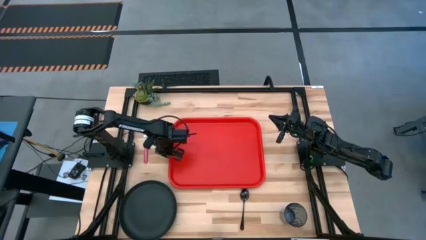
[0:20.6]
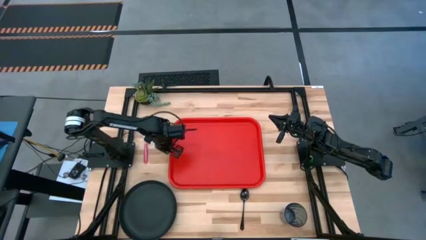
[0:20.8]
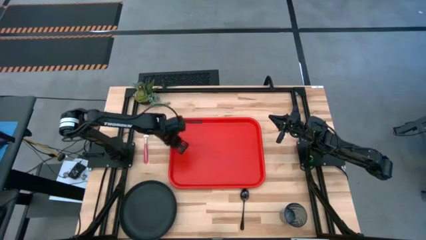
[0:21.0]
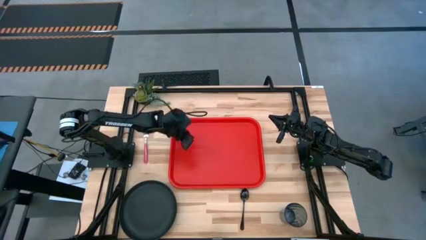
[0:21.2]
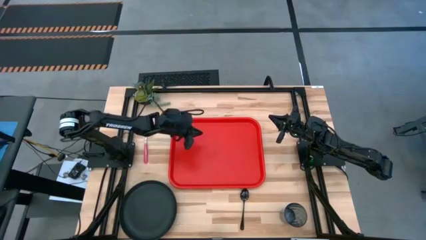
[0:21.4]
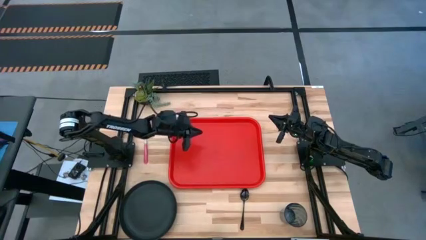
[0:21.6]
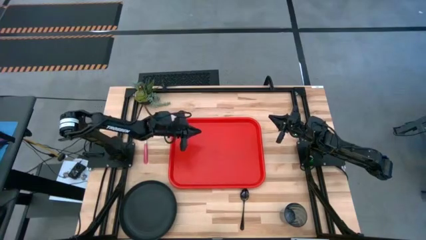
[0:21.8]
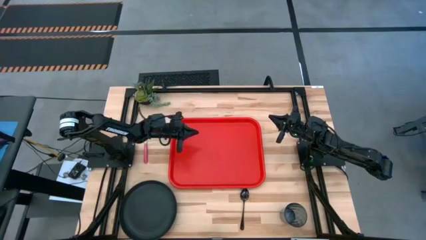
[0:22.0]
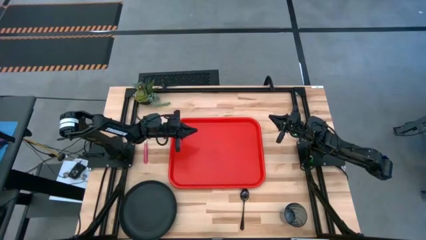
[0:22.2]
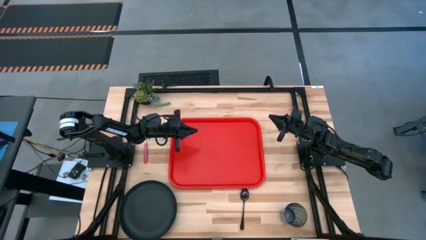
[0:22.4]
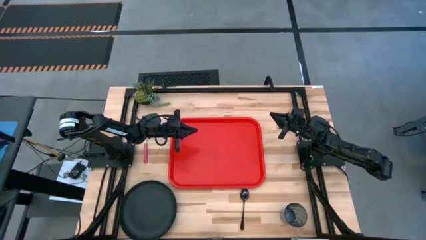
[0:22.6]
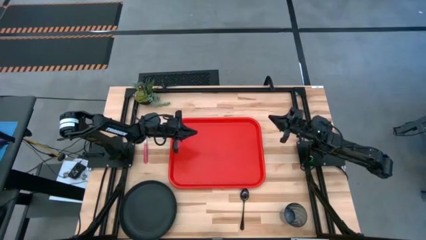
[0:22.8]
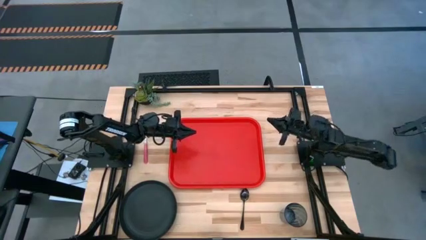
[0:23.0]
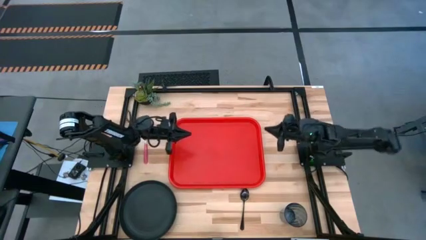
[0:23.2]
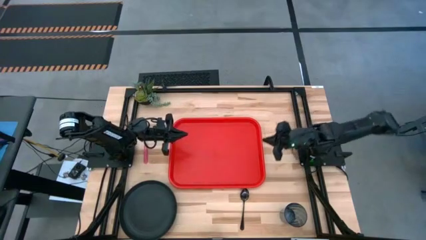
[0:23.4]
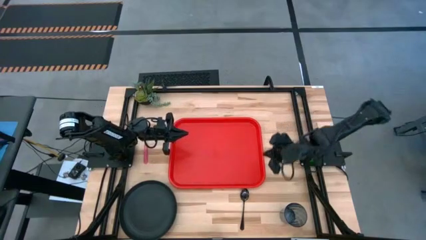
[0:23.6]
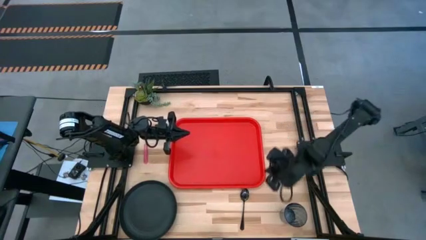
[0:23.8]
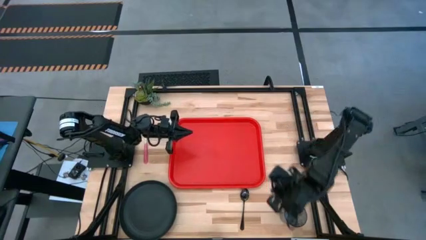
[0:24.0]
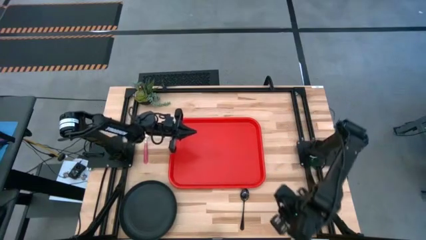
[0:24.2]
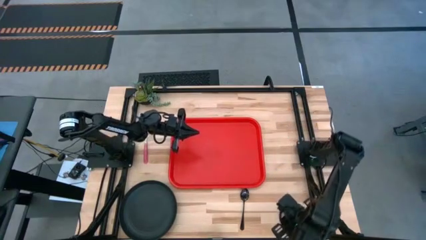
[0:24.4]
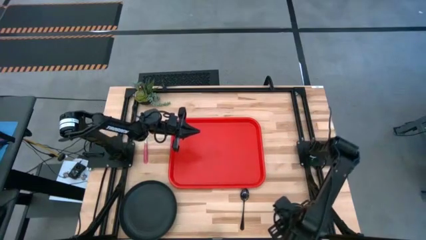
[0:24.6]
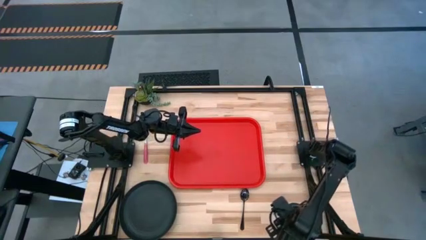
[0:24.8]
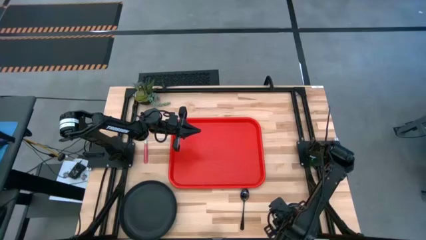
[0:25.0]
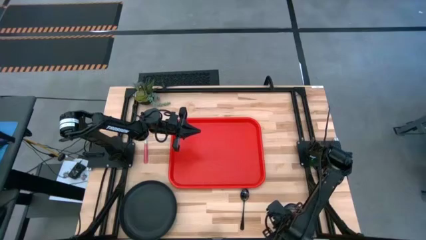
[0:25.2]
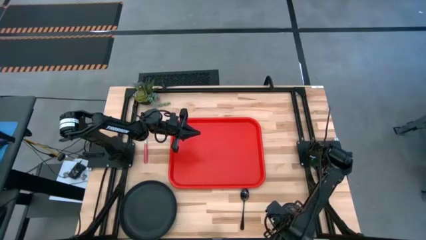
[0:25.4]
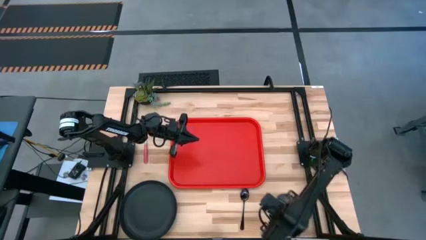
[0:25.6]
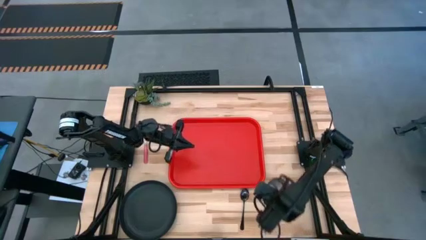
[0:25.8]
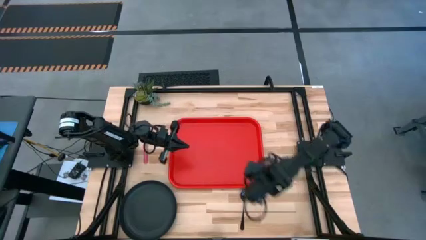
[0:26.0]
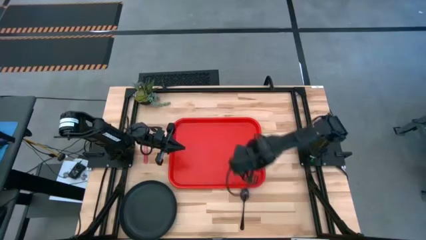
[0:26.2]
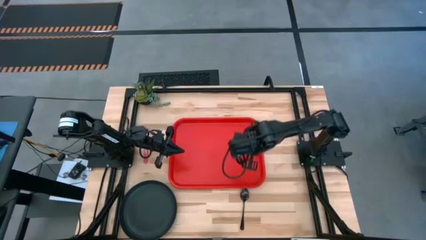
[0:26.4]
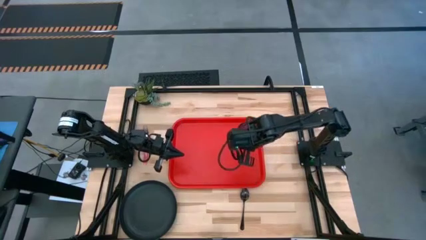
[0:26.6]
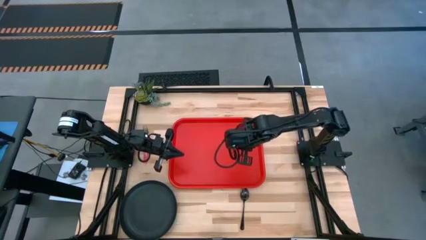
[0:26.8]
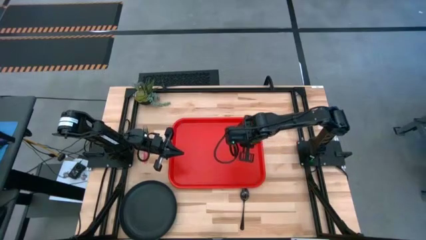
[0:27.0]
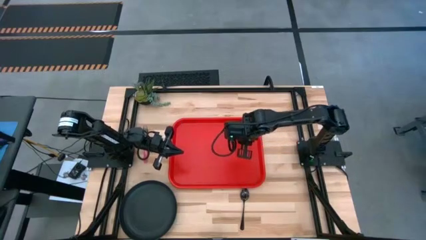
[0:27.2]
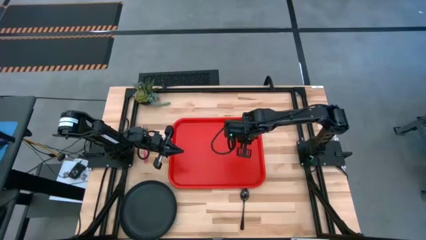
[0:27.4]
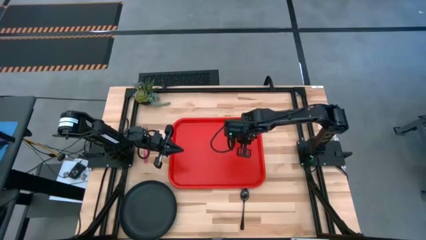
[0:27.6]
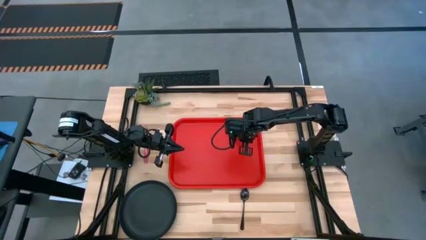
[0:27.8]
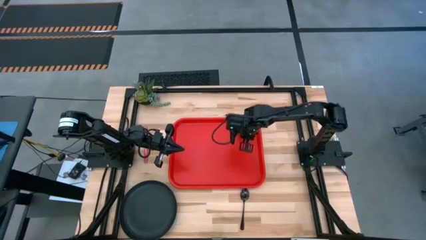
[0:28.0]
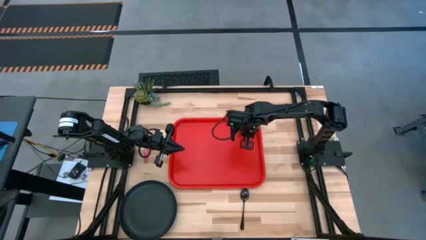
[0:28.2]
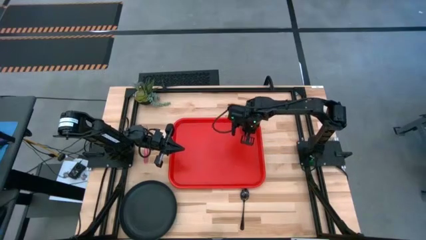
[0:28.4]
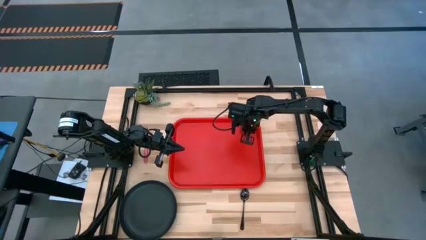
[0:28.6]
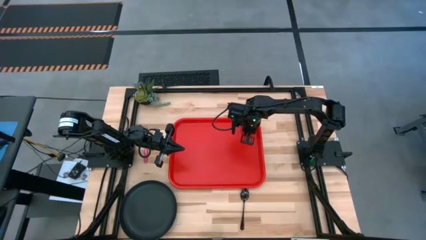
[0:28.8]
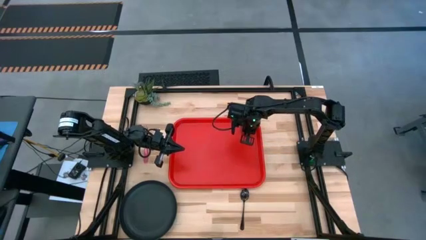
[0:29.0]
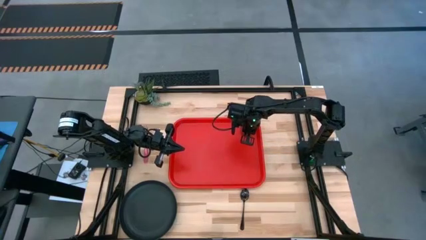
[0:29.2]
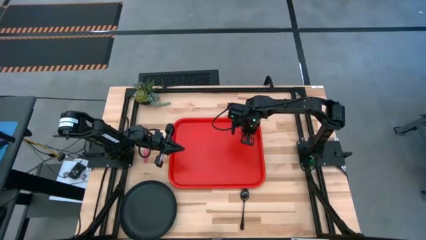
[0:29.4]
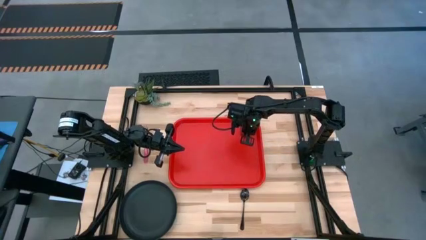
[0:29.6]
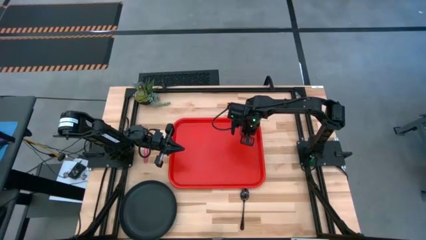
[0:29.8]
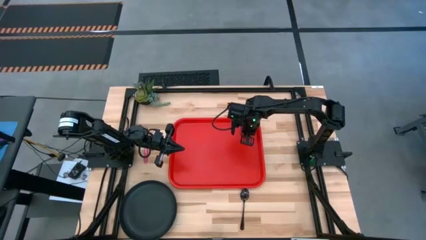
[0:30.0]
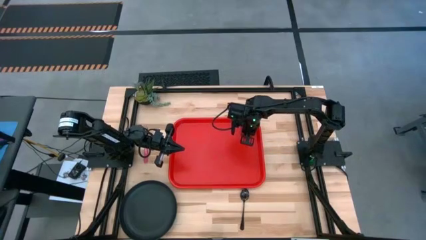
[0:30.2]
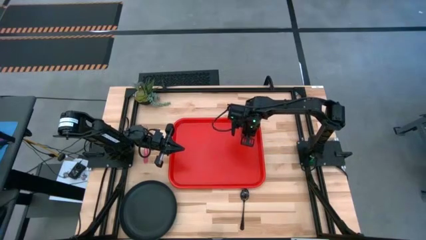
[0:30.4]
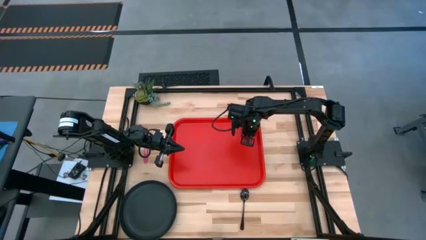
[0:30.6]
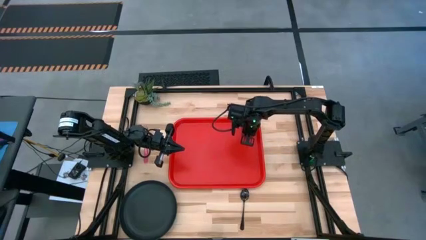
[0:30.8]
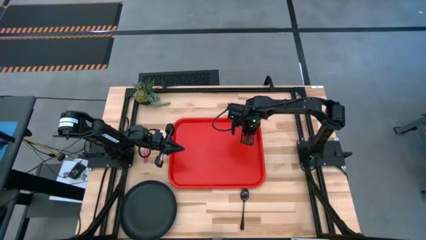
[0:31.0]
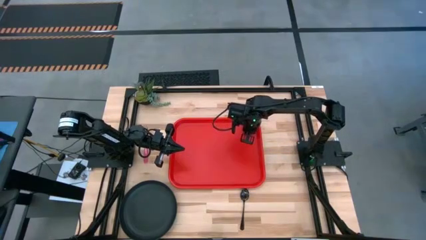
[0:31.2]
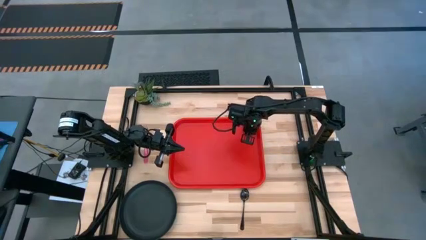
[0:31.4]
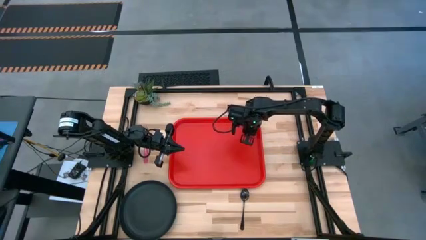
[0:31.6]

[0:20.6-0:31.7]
Task: Pick and place plate/cup/fork/spoon on tray
Put the blue cup on the red tray

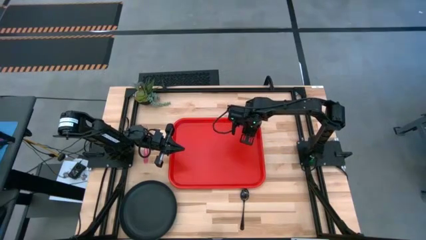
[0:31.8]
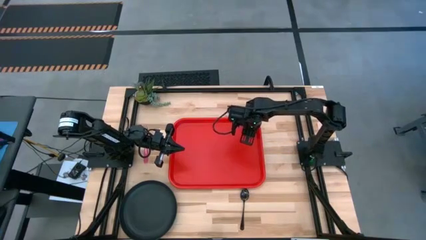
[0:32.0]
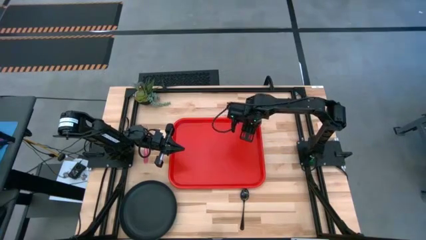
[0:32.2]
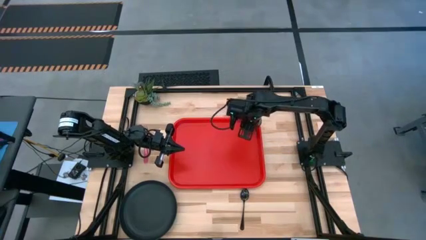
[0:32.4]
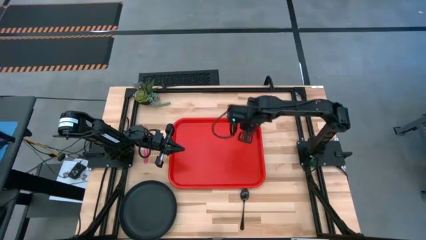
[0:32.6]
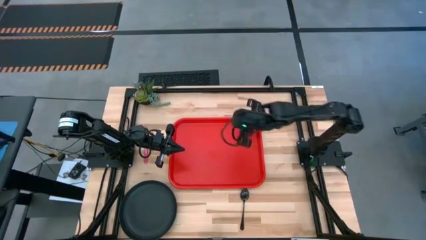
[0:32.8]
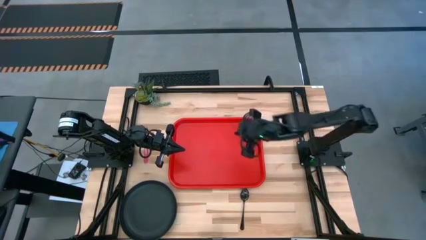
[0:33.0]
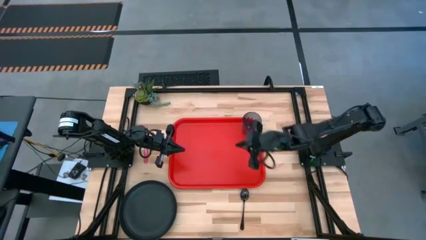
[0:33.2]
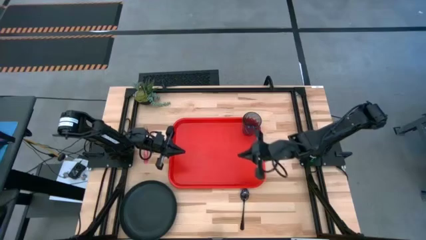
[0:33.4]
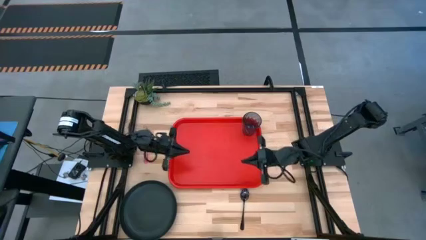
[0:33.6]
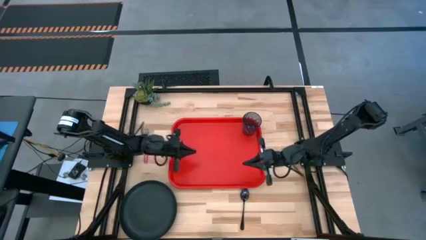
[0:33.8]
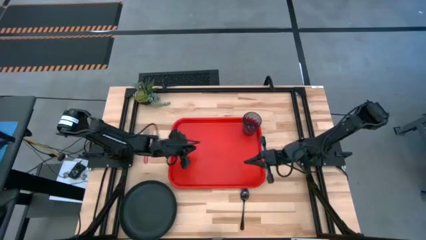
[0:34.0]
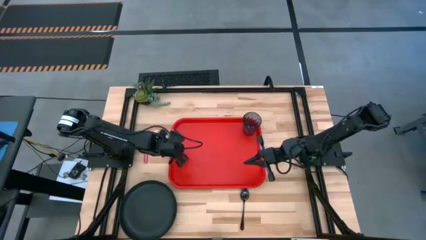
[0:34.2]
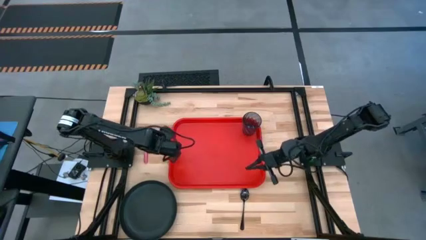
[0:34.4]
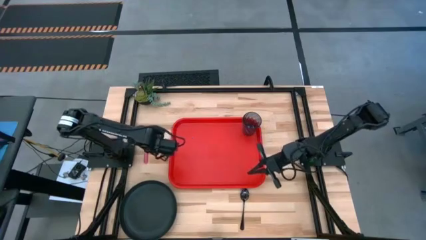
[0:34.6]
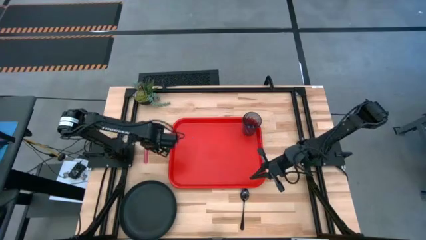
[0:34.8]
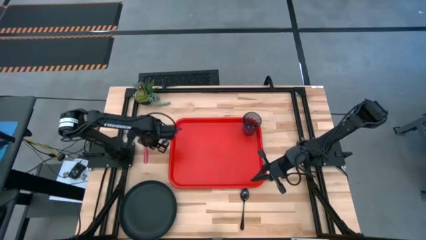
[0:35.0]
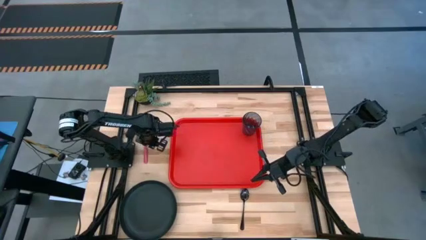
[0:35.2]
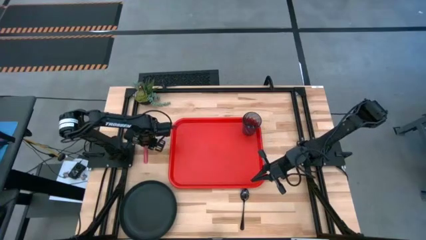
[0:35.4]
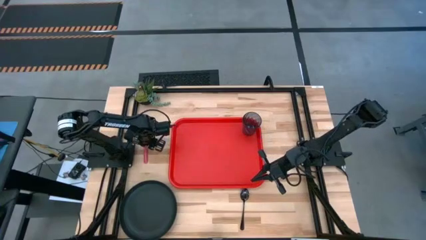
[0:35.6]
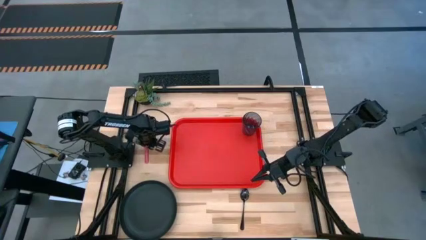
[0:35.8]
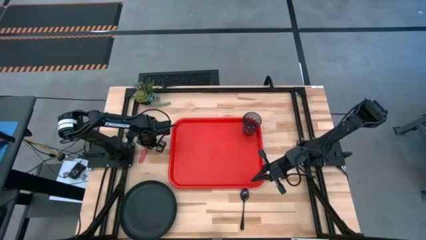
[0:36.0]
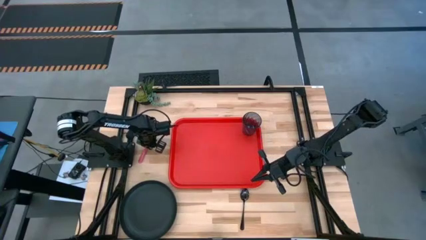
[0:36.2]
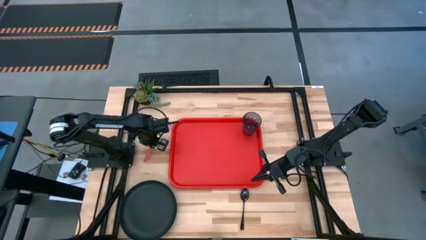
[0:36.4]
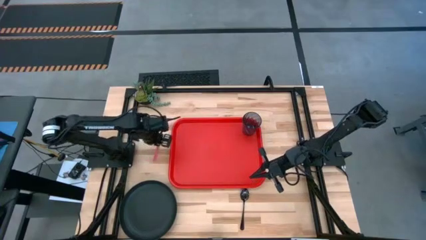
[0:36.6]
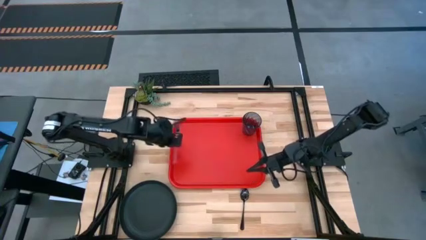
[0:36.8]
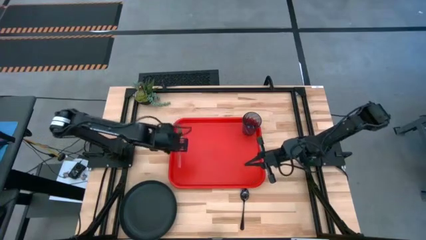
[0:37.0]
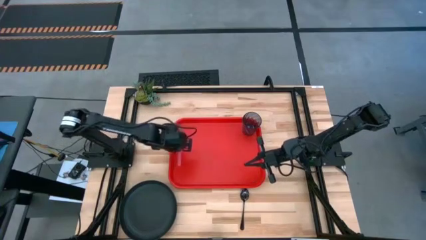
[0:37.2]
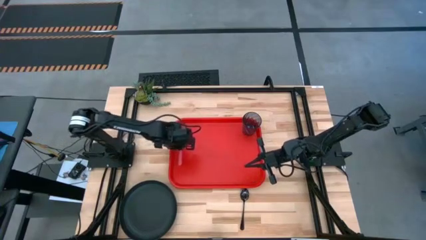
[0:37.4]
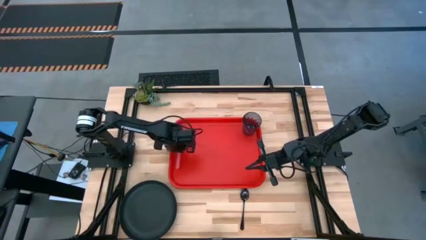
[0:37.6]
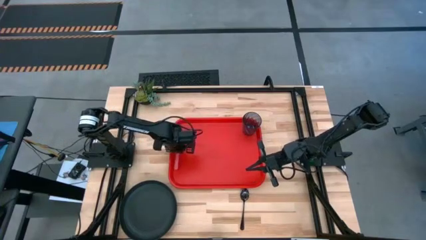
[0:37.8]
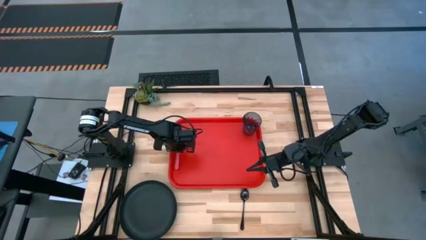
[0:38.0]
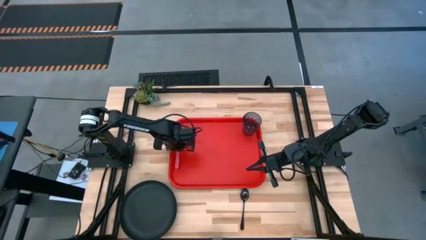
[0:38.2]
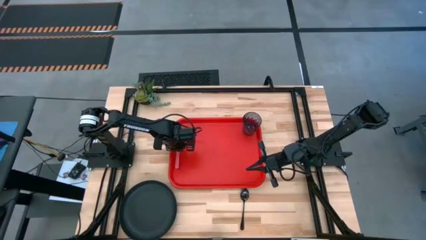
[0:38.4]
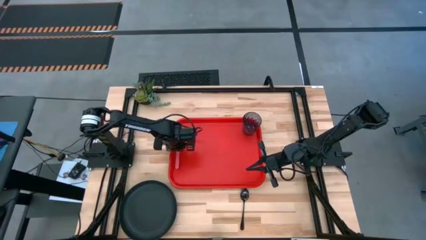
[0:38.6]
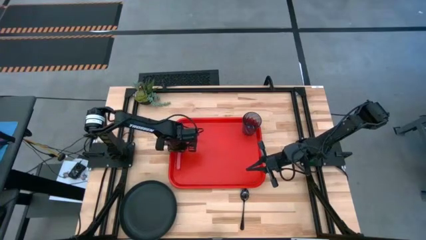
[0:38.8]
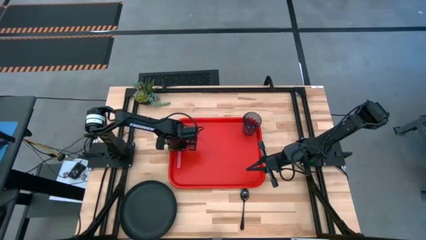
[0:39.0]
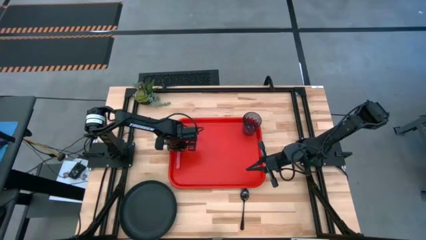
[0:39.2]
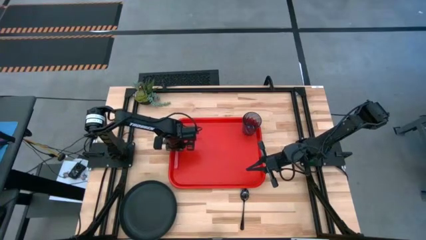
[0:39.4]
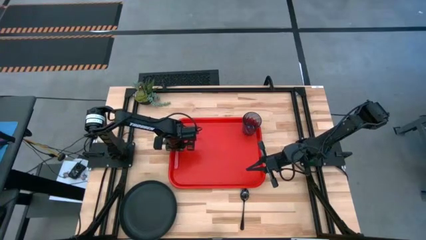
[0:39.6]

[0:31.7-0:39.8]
Put the pink fork to the left of the blue cup on the red tray
